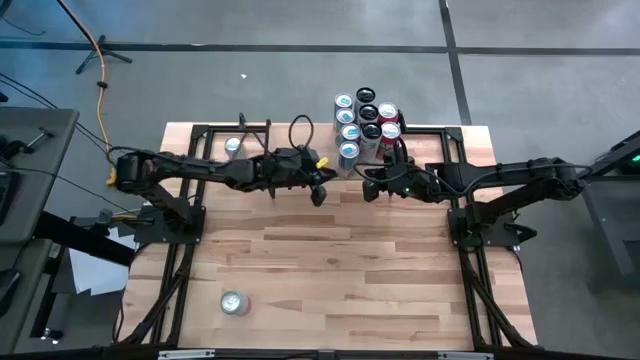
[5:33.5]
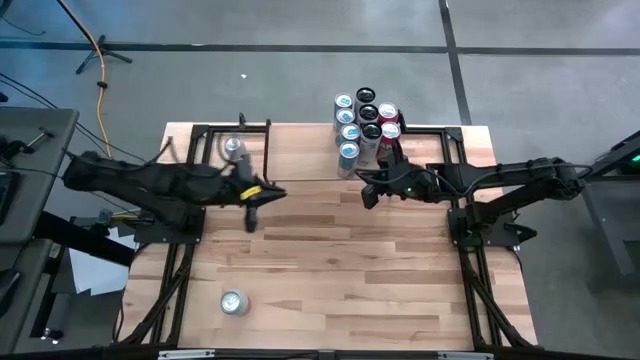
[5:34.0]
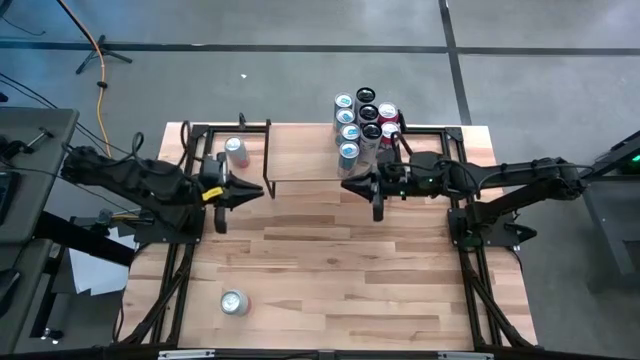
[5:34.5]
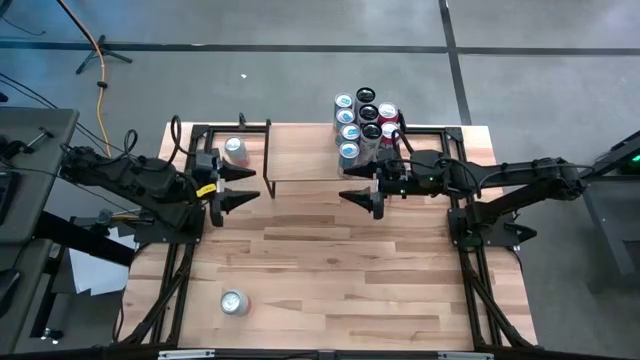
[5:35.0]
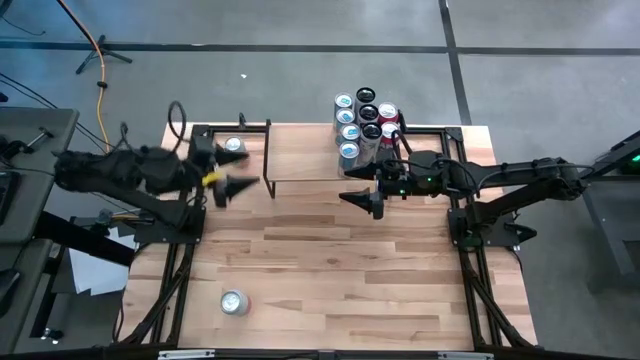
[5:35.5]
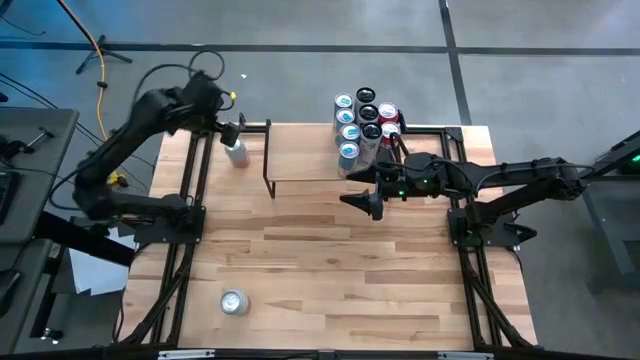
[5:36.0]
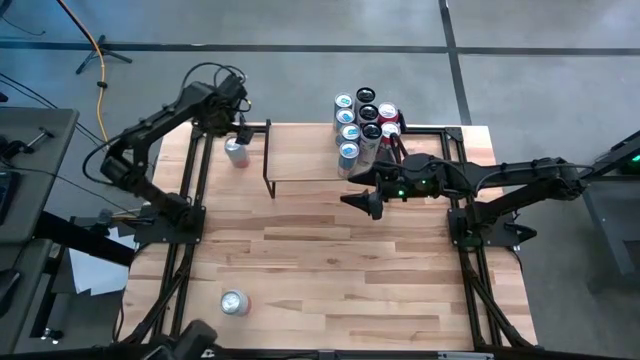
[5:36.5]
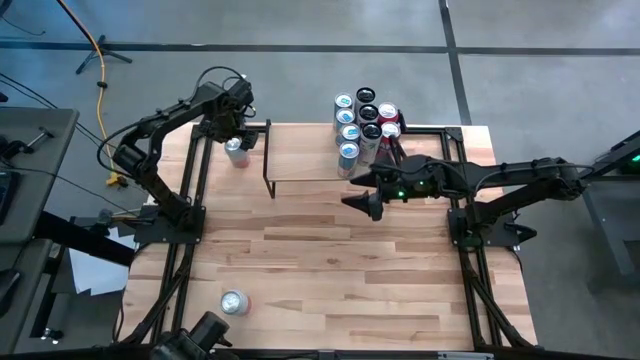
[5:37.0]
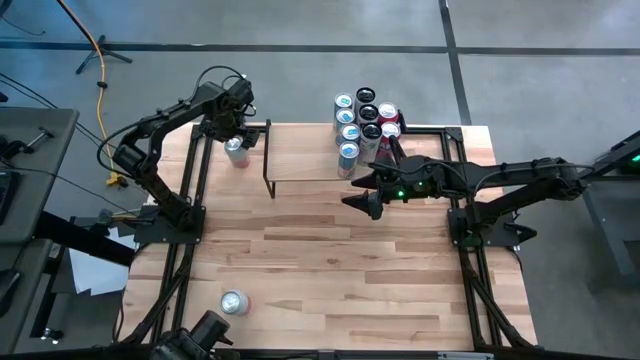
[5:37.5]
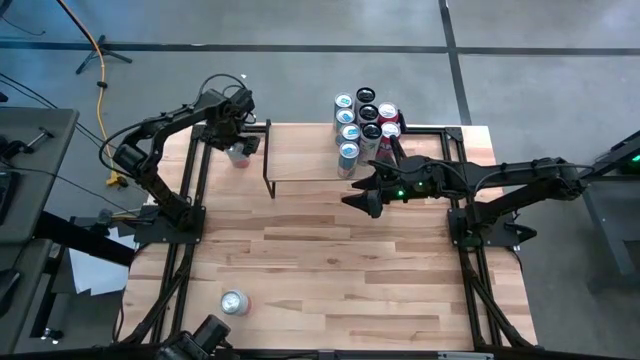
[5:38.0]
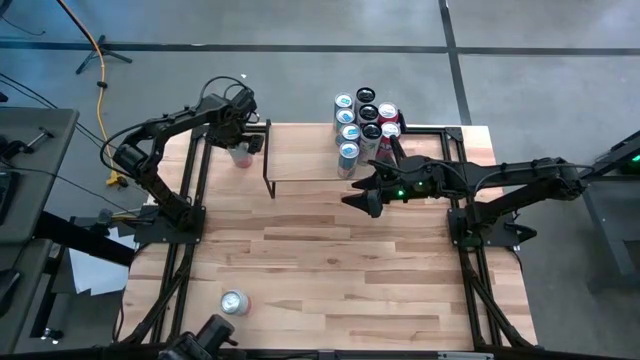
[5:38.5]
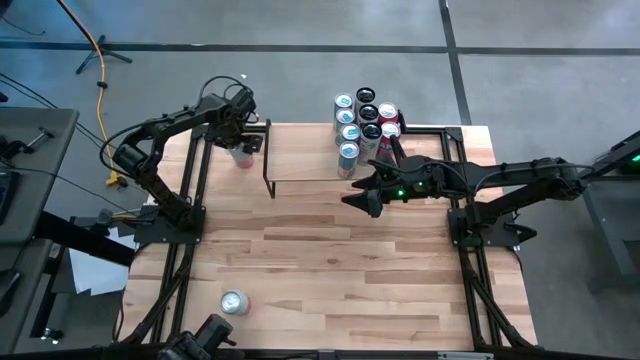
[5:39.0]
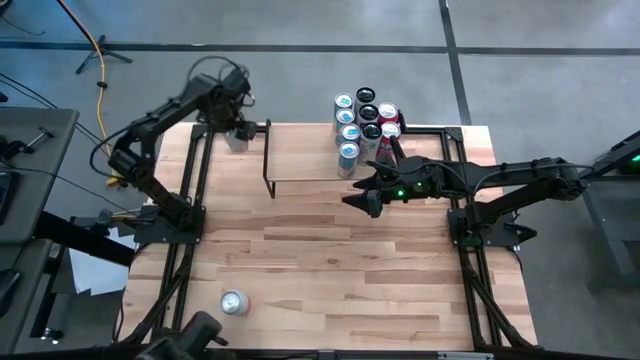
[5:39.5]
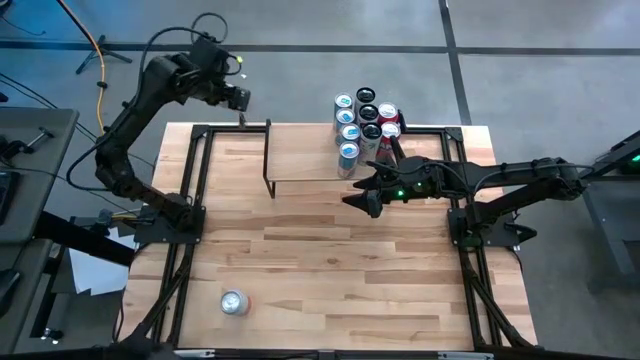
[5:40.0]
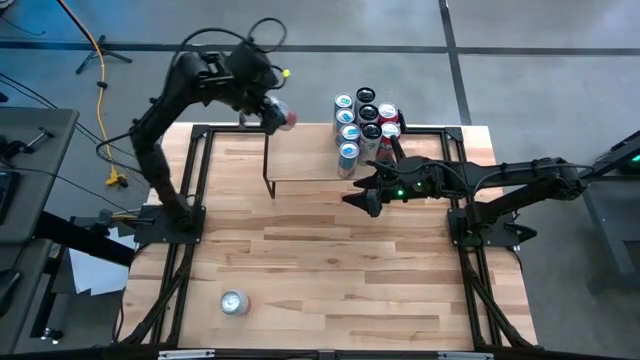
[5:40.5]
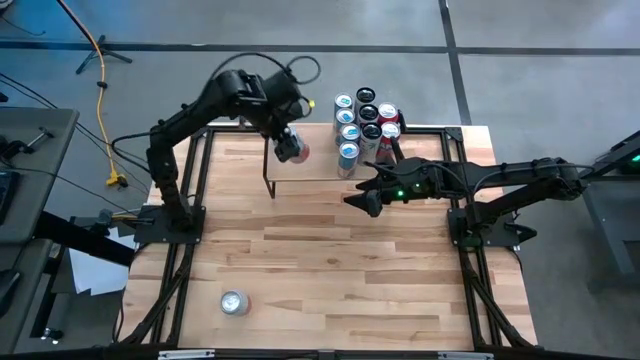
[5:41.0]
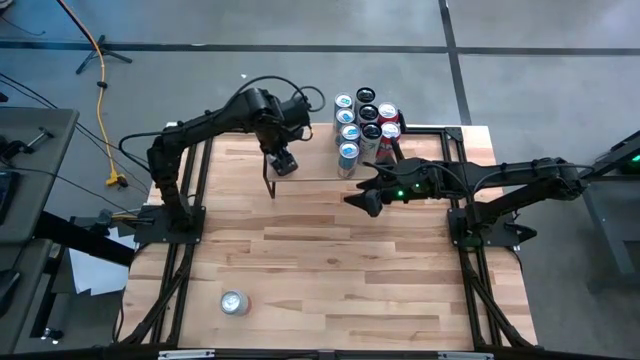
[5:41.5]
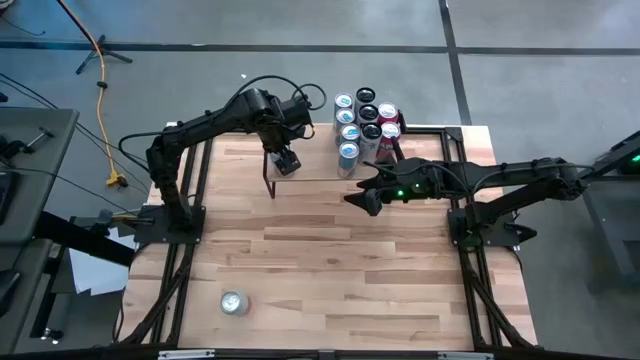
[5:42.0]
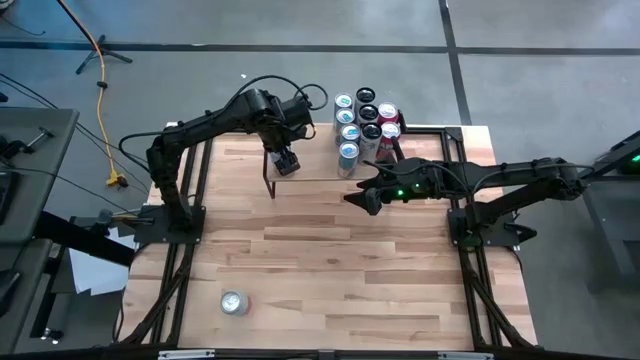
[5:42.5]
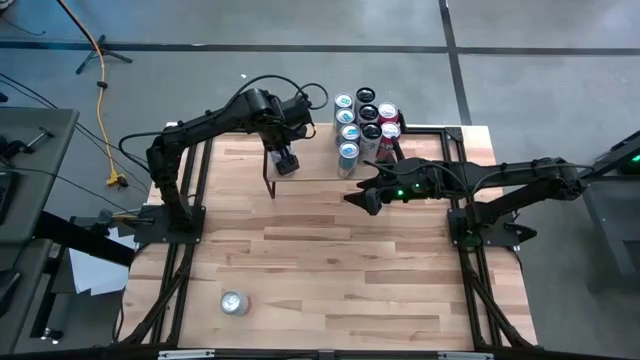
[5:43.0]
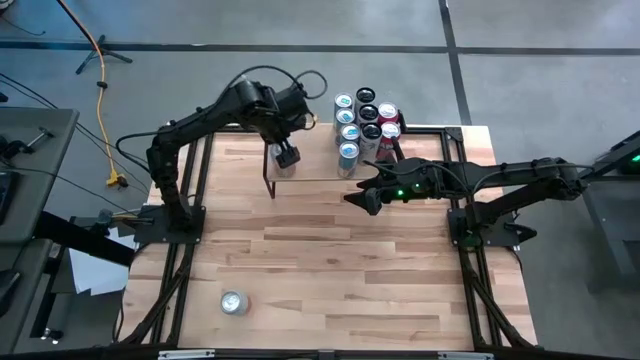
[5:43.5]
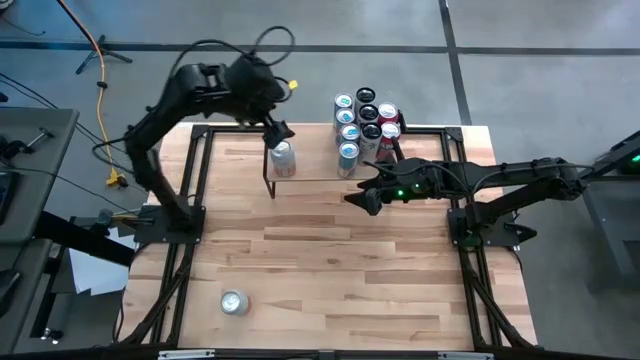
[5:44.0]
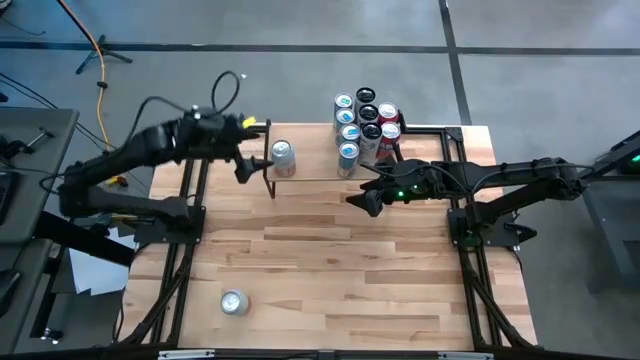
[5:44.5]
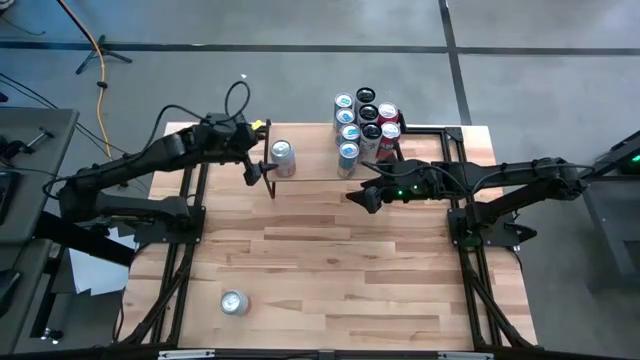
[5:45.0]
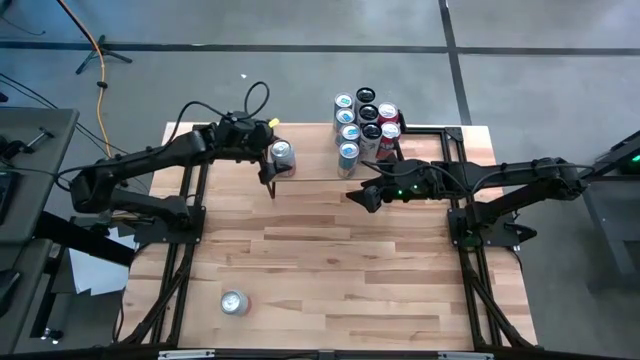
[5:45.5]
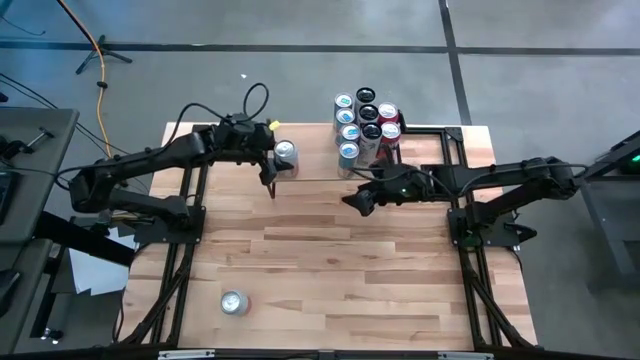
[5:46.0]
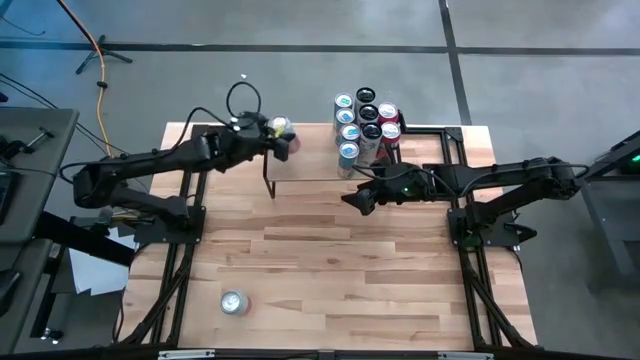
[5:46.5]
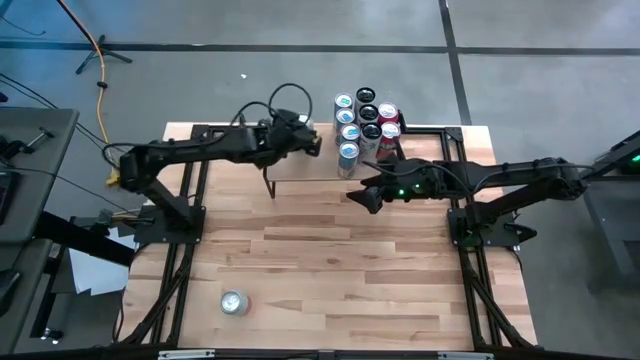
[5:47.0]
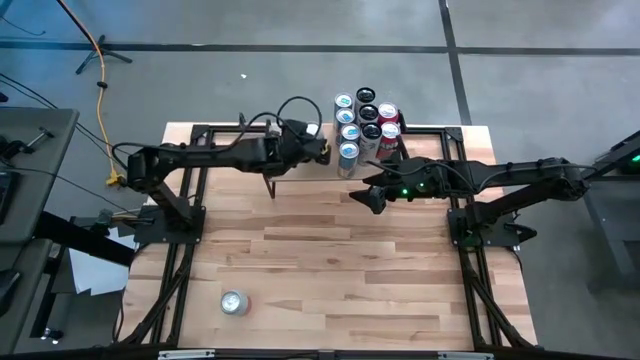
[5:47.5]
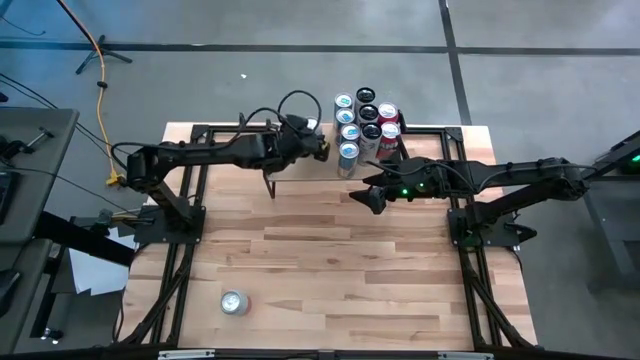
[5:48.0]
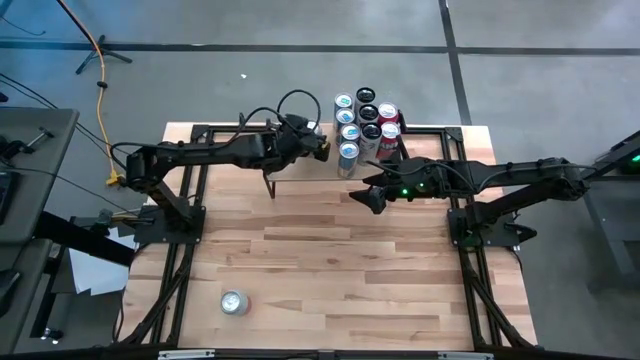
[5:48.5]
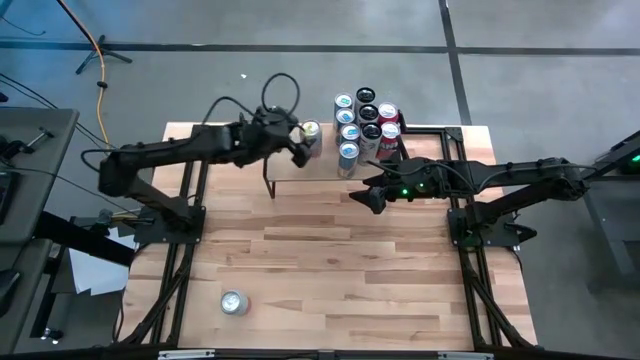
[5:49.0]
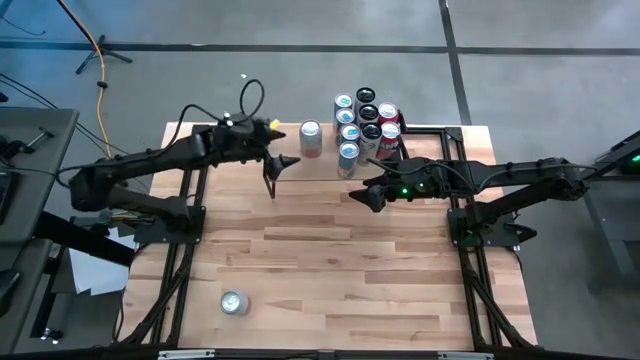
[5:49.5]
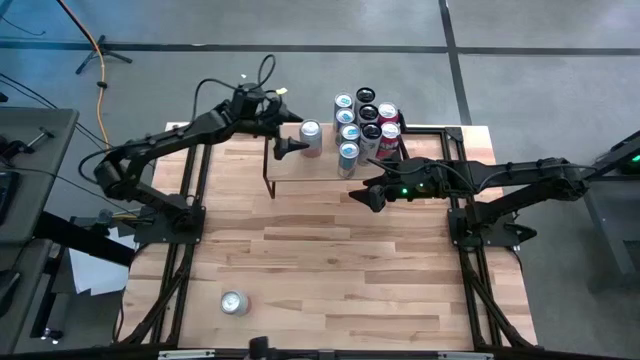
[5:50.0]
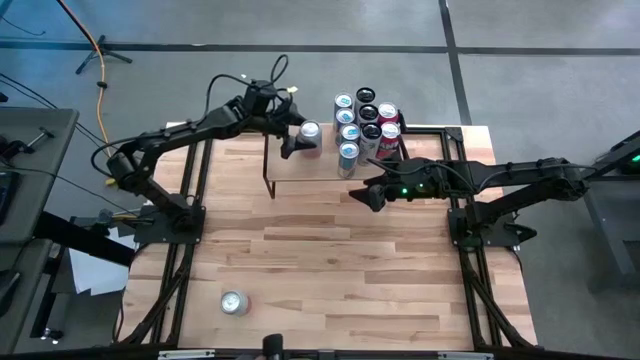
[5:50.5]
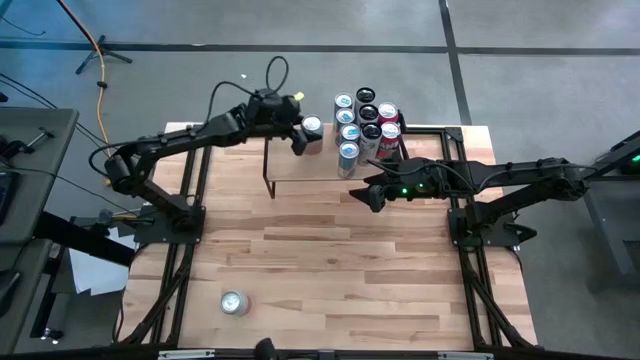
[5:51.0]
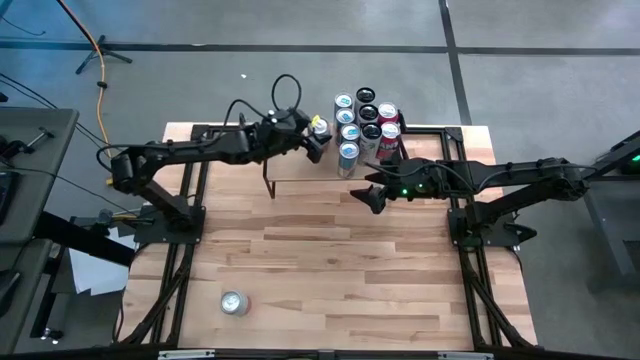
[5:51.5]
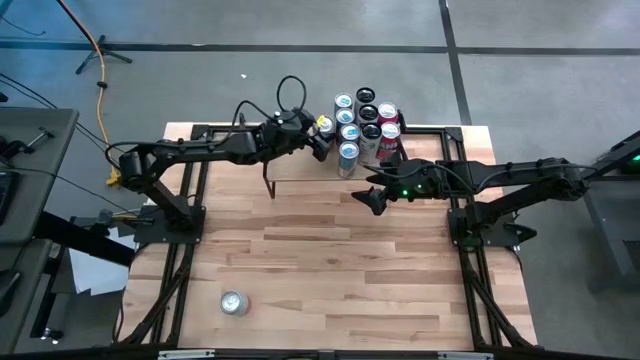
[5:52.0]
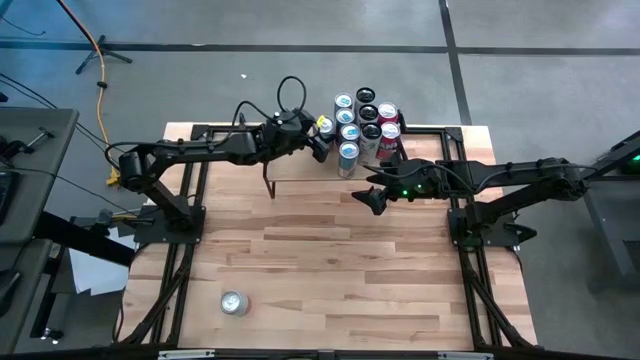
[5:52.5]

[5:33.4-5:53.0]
Task: Place canned beverage on shelf
Put the top orange-white soda can on the shelf

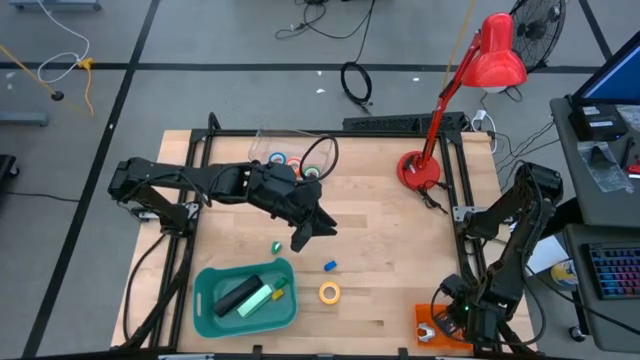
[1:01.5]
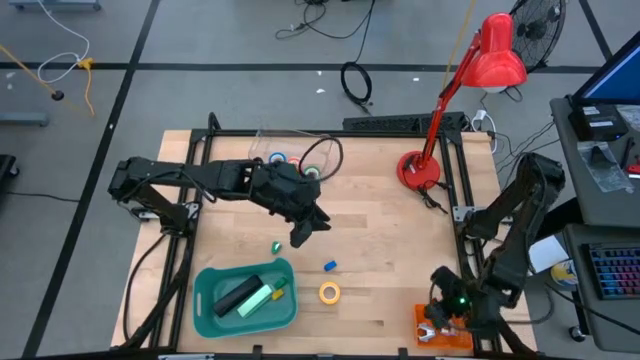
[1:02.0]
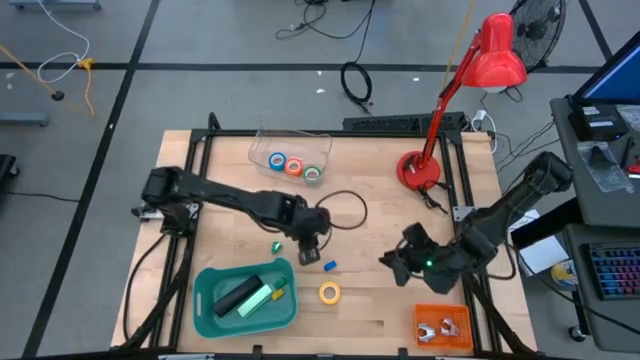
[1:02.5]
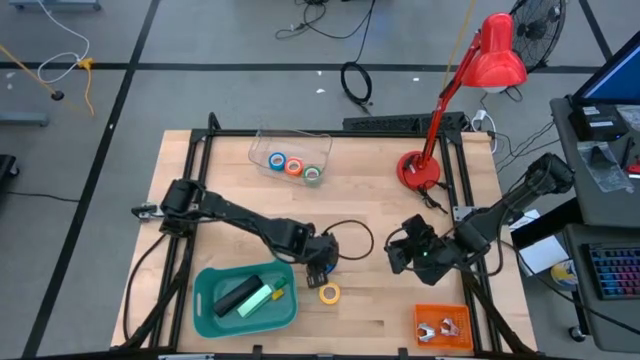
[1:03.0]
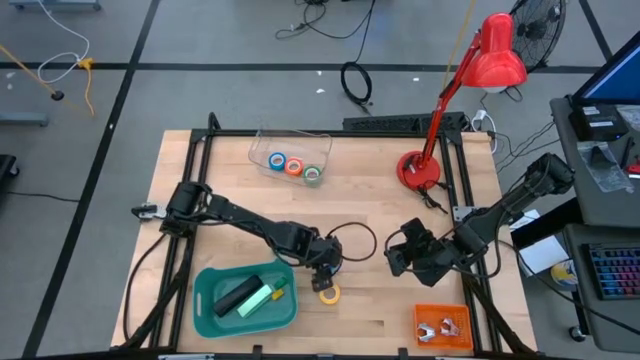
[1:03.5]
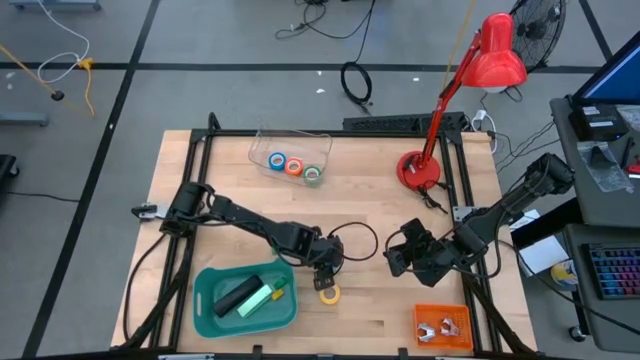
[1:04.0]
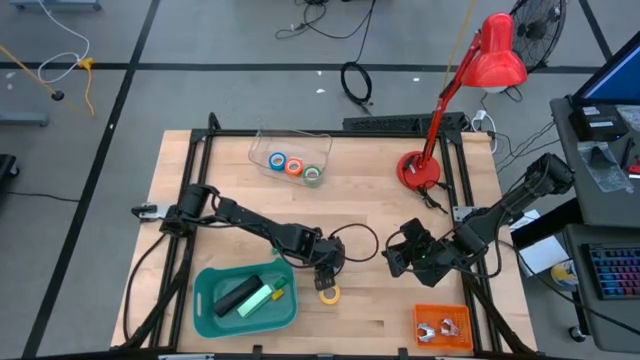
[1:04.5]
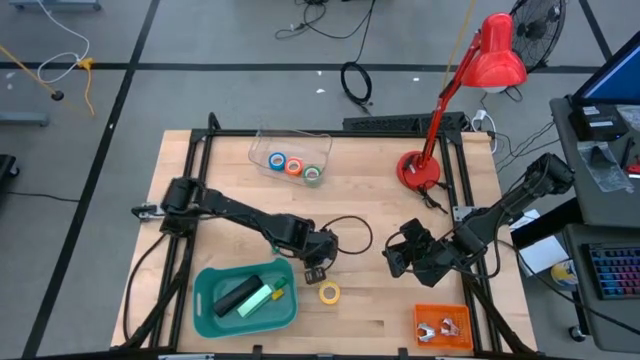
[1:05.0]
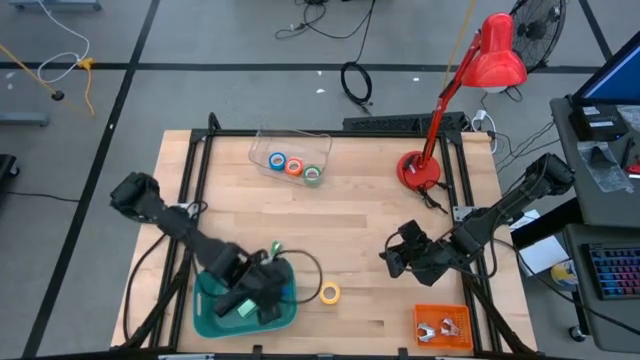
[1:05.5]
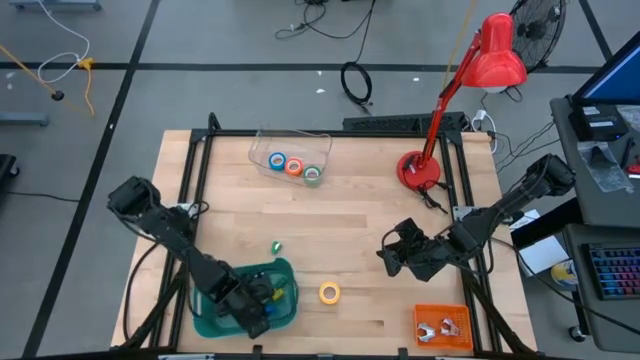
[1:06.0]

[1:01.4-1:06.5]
Task: Pick and place Stapler, Stapler remover, tape
Put the small blue stapler into the green bin
